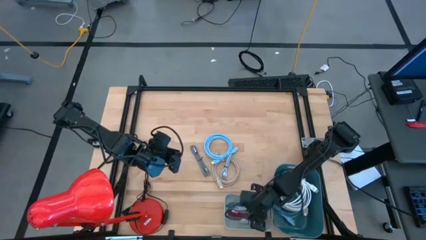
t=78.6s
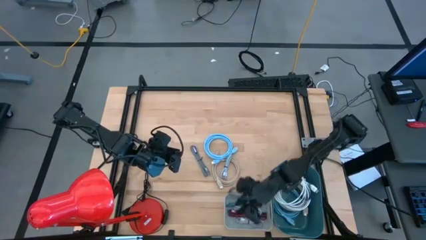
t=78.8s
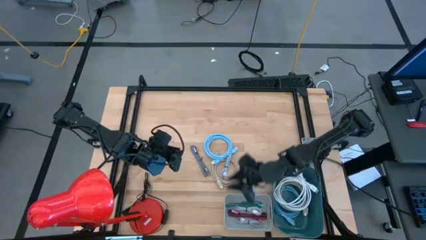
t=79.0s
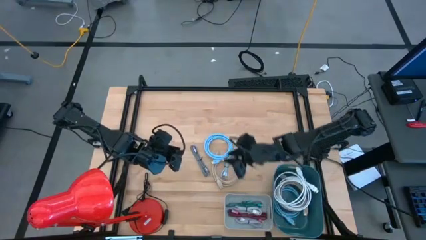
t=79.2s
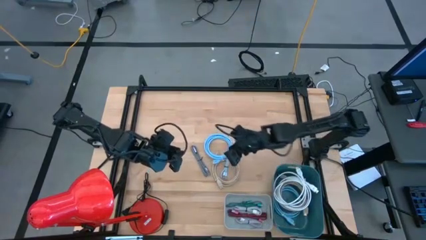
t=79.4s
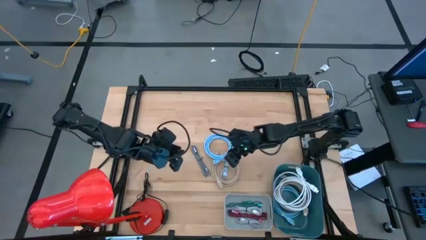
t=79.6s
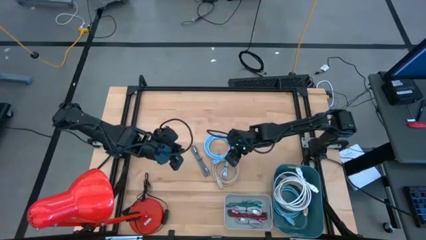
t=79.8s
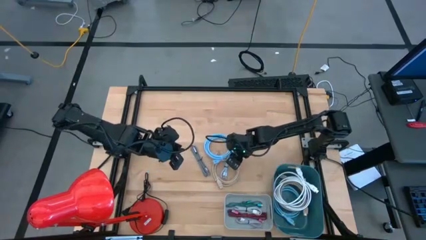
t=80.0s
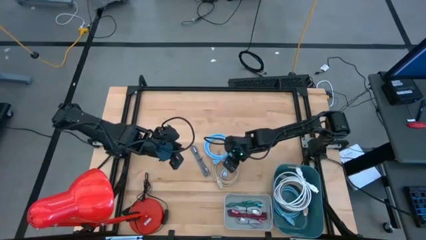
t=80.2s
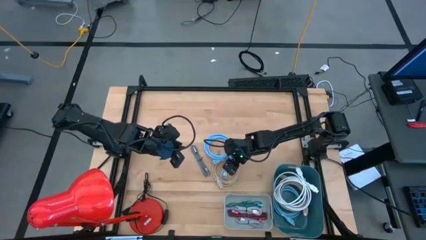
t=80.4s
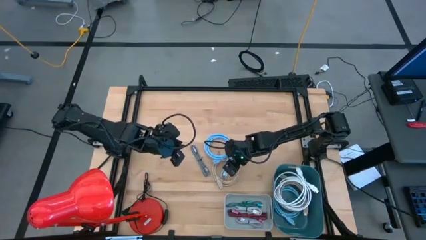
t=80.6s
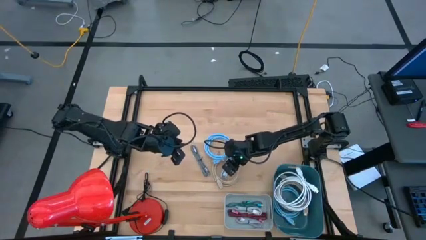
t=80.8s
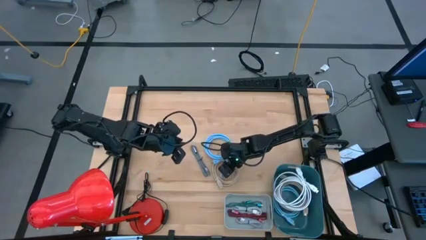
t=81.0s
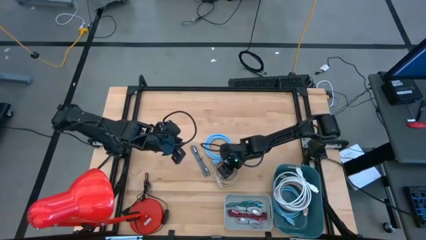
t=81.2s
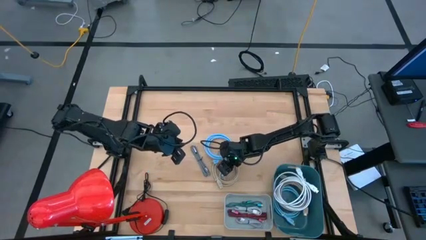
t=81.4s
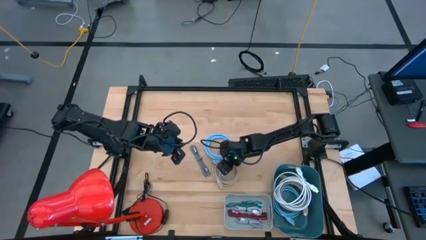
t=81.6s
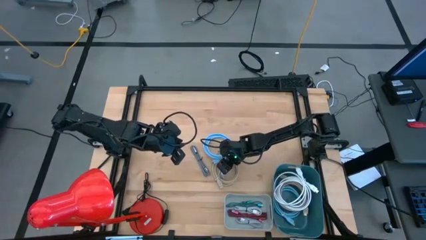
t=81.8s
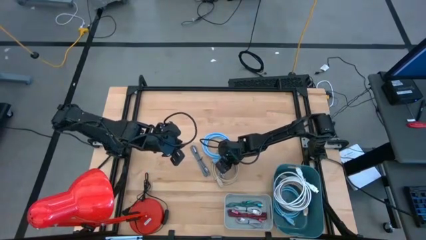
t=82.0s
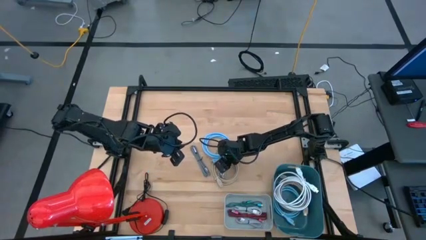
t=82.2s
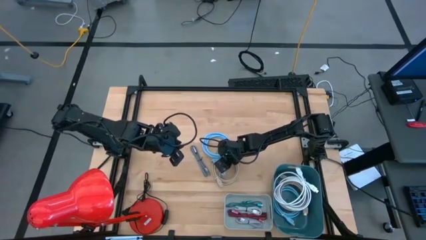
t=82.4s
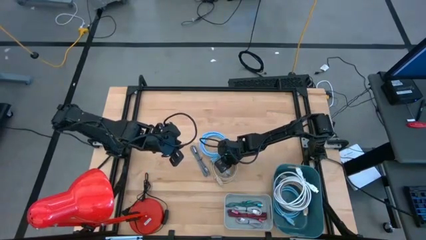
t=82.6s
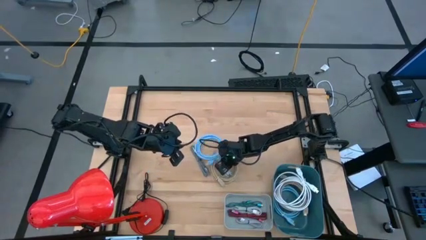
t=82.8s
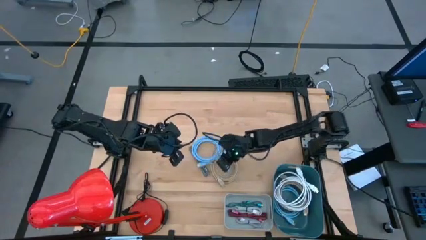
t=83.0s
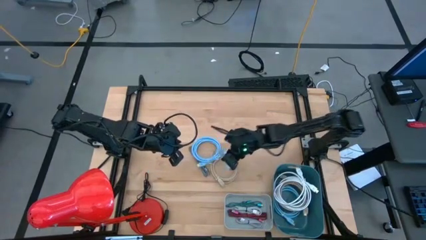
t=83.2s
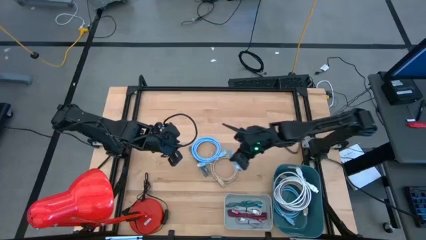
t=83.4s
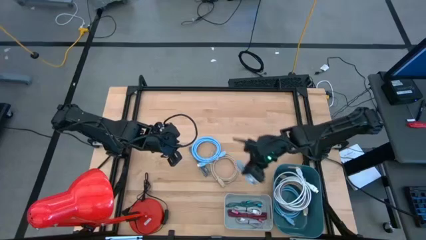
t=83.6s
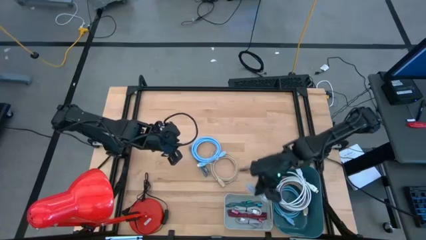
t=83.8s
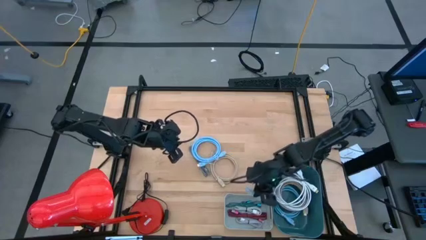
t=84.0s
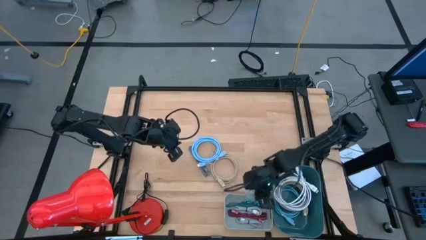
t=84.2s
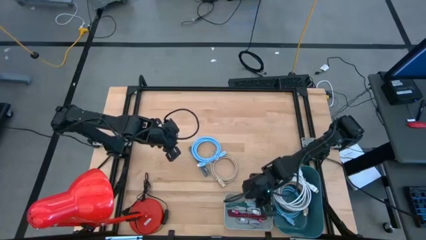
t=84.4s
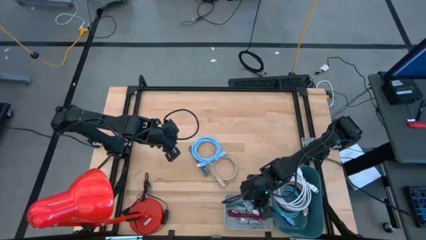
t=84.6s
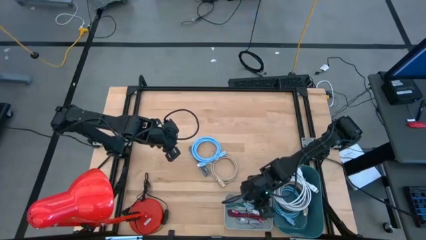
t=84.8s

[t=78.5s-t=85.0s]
Task: Pick & Place USB Port
Put the light blue USB cable into the gray bin

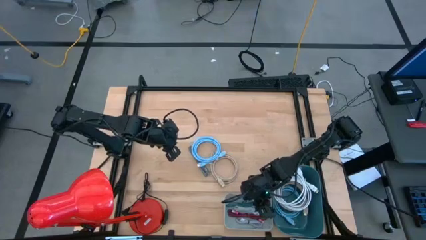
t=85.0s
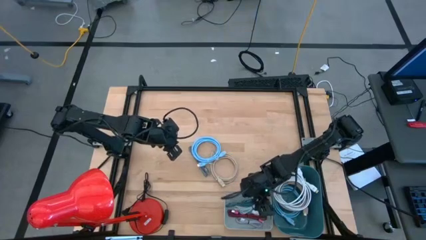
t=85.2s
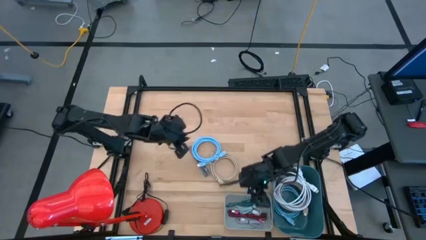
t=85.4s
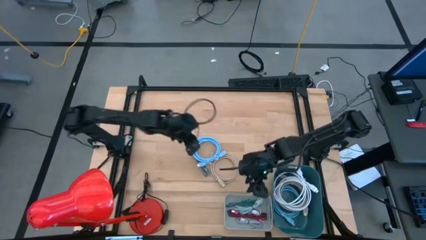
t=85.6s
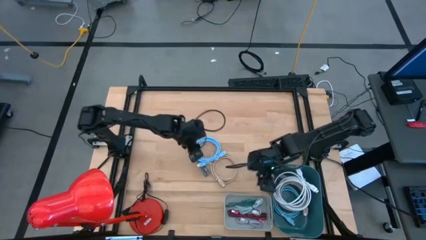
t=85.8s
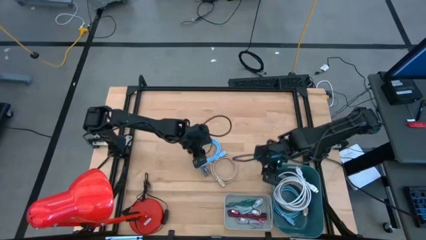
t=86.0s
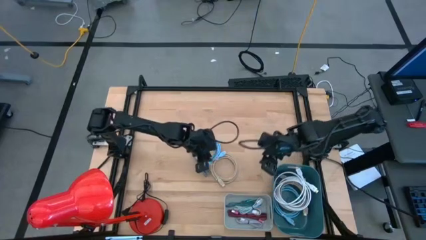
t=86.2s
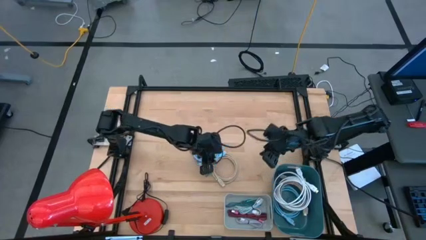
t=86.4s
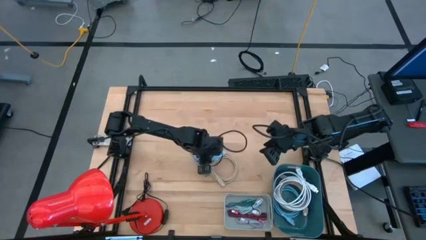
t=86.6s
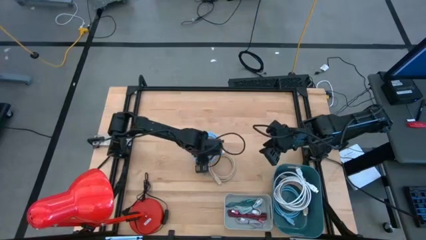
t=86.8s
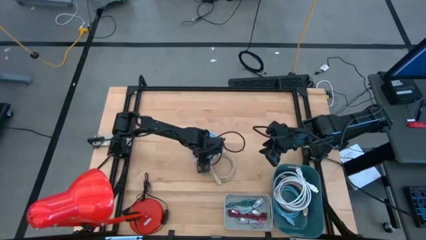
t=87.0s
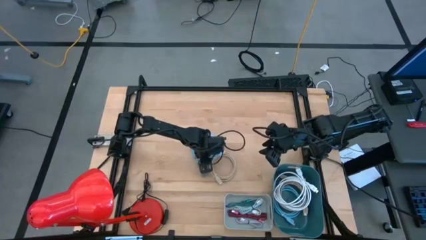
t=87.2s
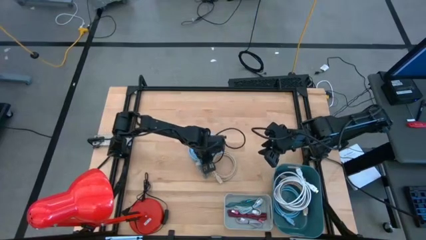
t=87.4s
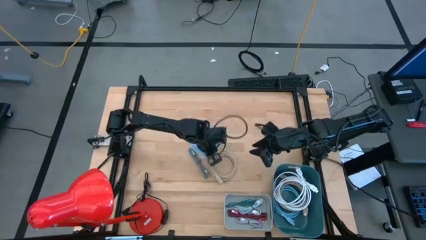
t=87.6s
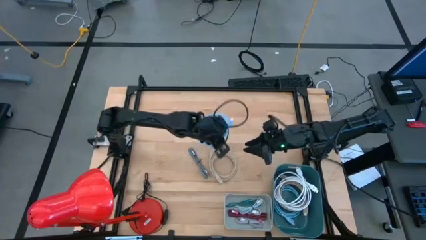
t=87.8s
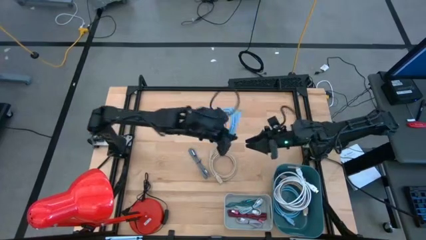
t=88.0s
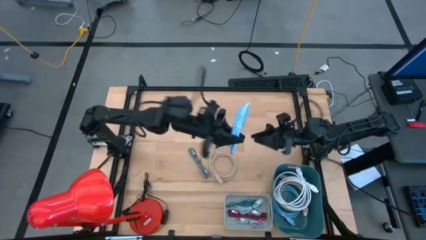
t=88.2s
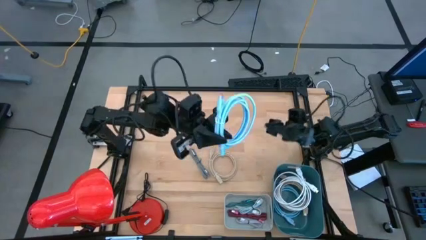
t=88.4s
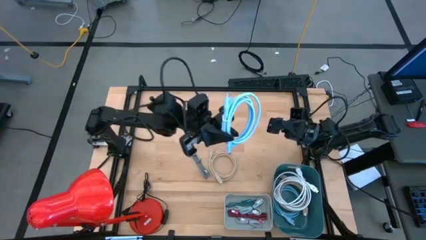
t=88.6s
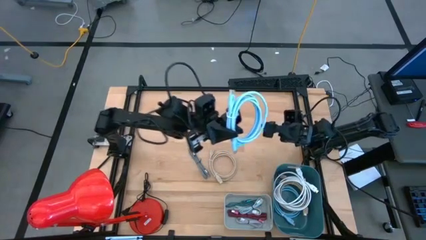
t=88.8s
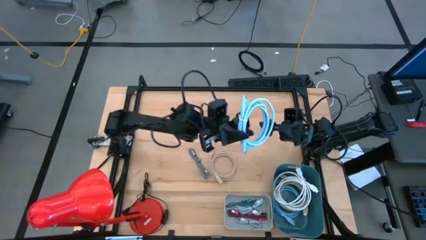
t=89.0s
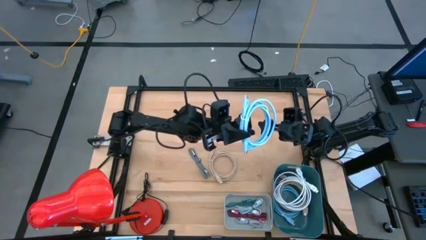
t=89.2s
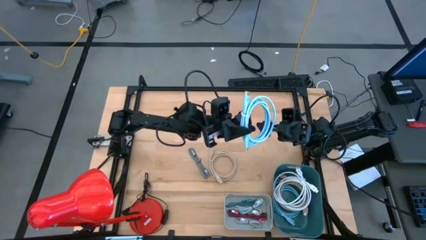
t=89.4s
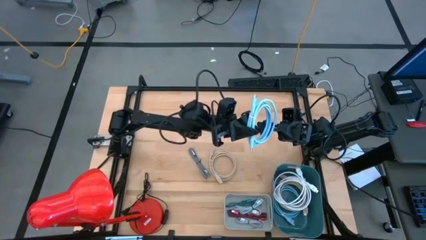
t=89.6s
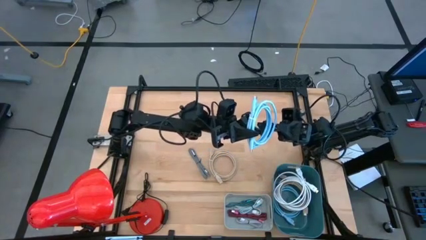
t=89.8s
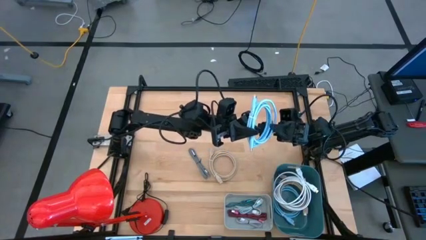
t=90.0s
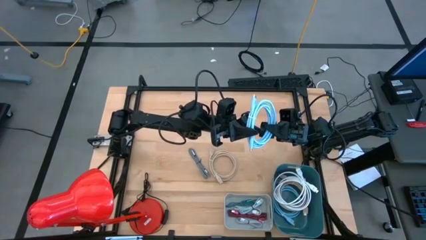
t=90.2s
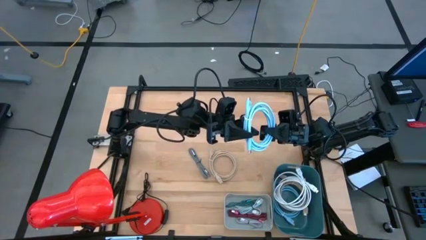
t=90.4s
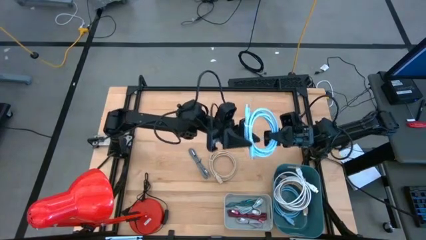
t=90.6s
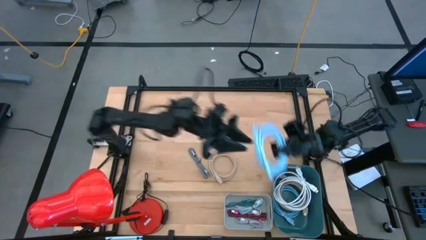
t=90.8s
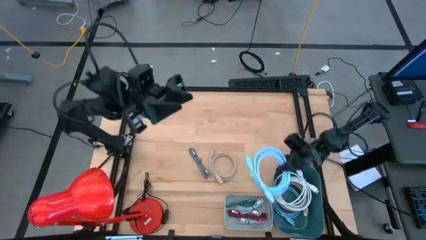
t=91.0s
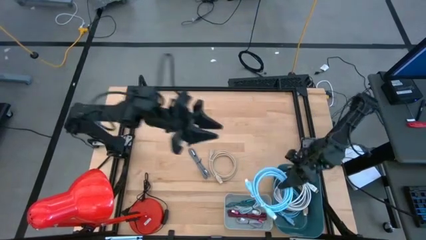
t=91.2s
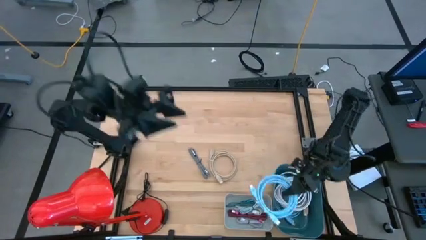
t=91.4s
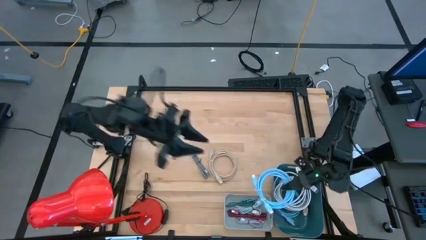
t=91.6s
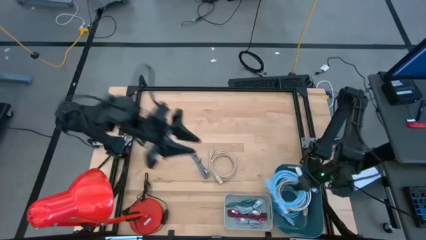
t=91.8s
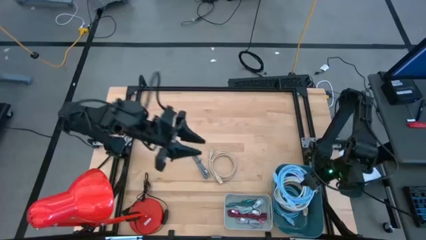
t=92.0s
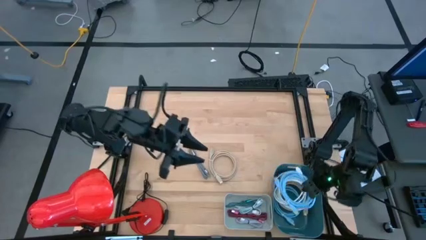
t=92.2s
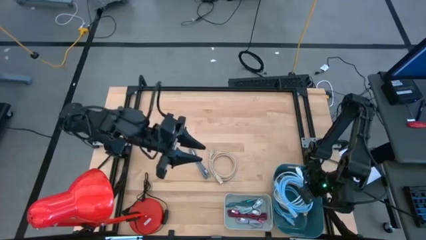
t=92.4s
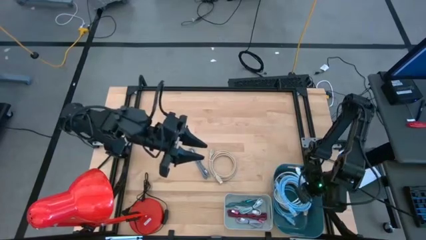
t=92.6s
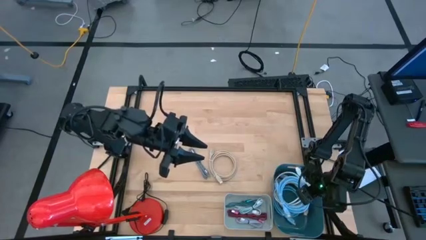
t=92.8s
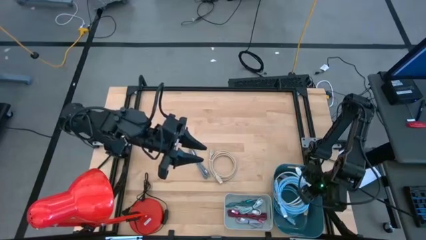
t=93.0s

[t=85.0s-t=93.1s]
Put the blue HDMI cable into the blue bin
